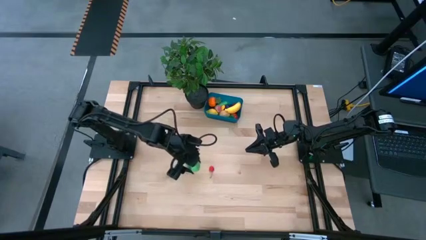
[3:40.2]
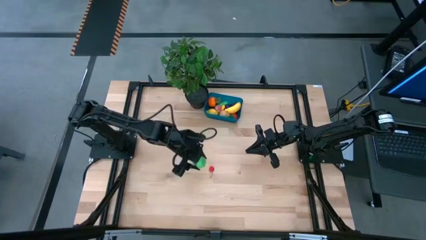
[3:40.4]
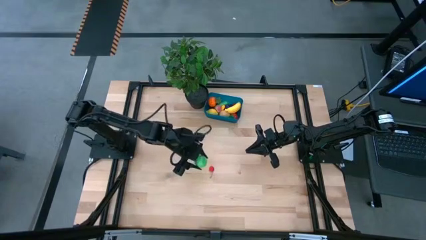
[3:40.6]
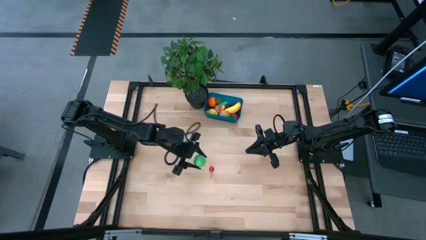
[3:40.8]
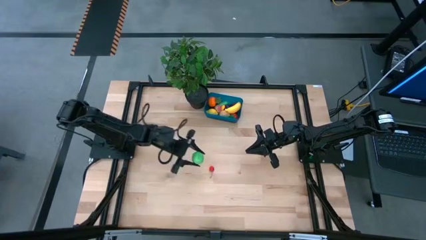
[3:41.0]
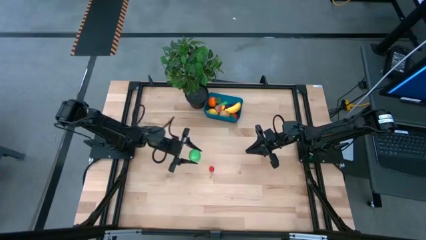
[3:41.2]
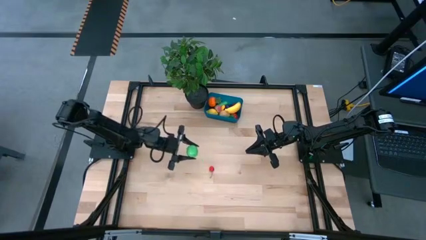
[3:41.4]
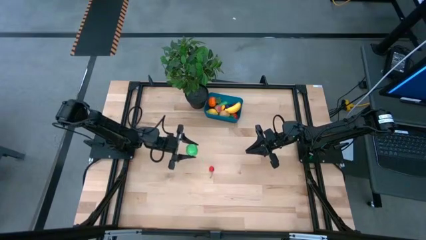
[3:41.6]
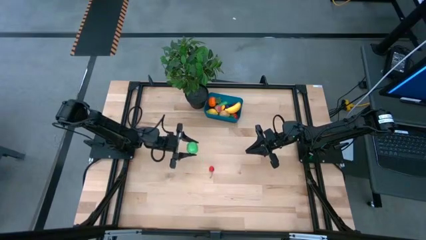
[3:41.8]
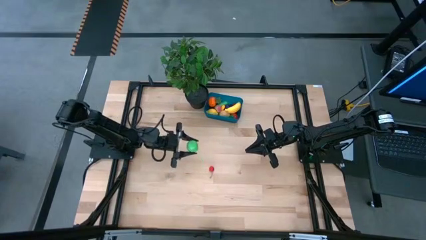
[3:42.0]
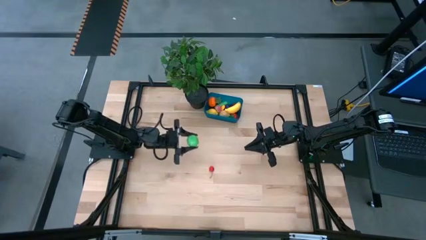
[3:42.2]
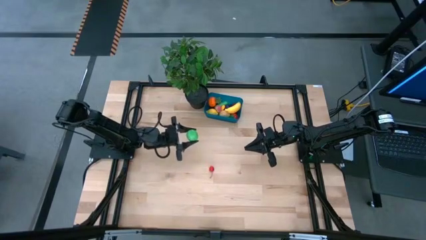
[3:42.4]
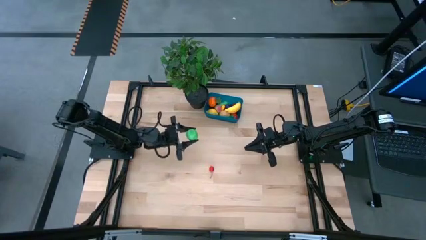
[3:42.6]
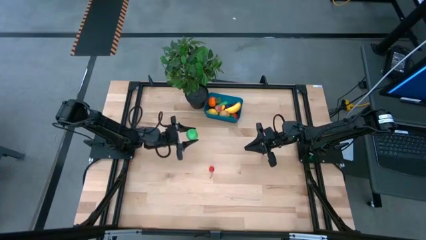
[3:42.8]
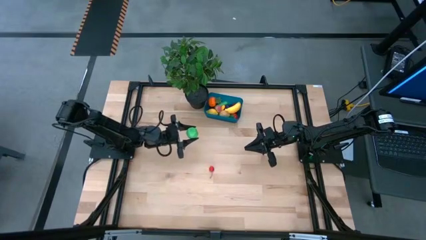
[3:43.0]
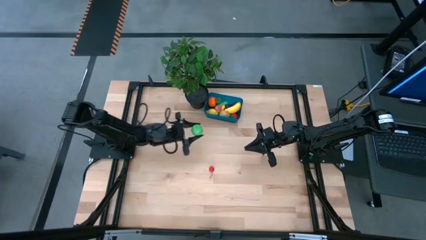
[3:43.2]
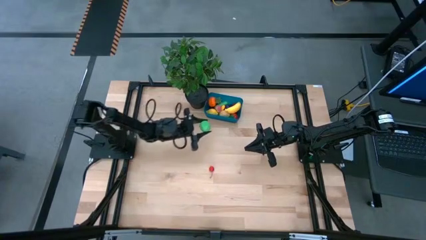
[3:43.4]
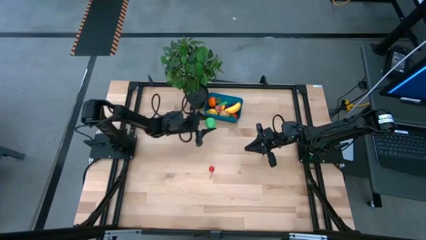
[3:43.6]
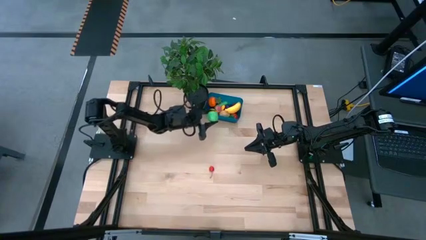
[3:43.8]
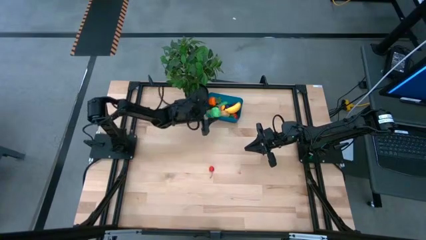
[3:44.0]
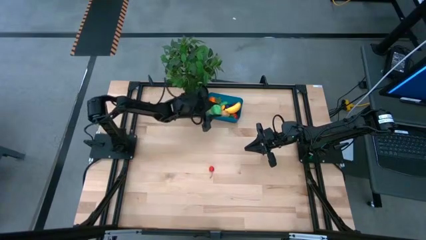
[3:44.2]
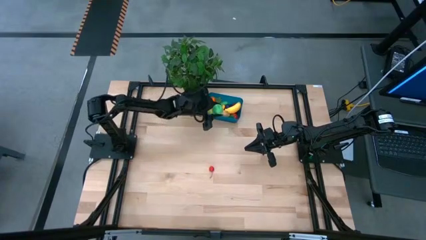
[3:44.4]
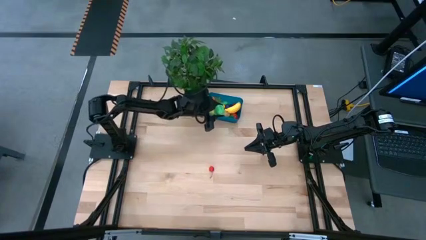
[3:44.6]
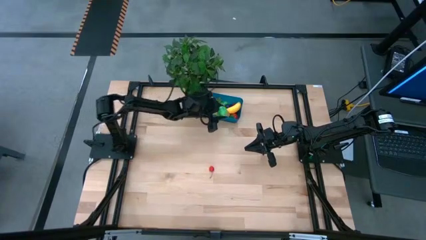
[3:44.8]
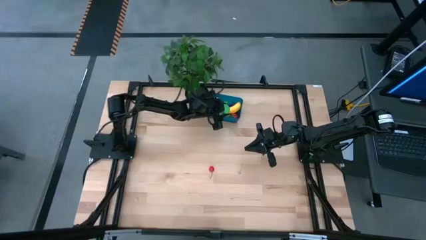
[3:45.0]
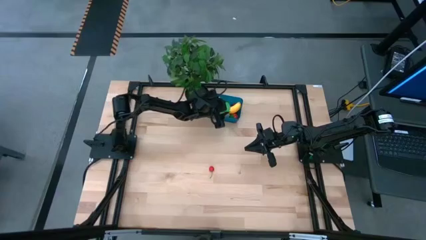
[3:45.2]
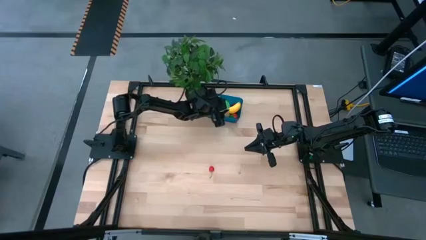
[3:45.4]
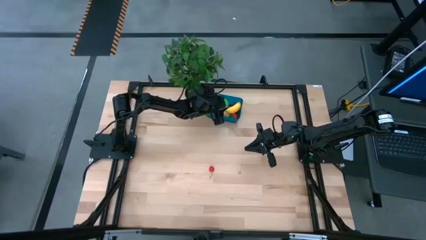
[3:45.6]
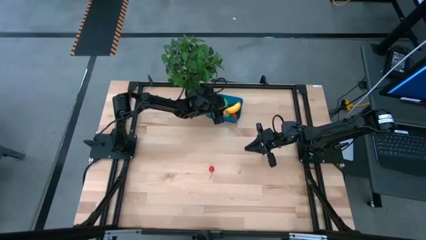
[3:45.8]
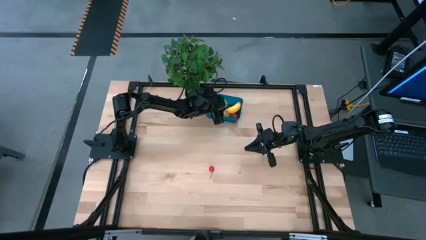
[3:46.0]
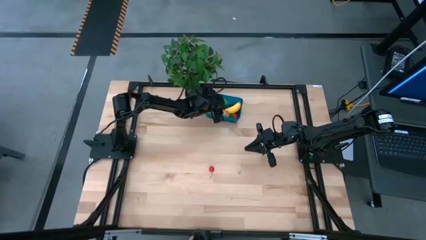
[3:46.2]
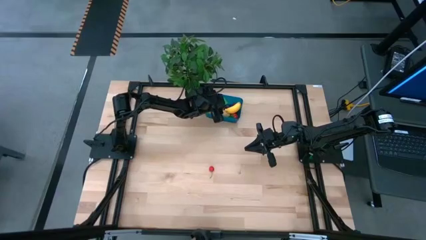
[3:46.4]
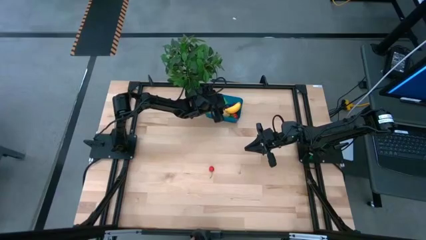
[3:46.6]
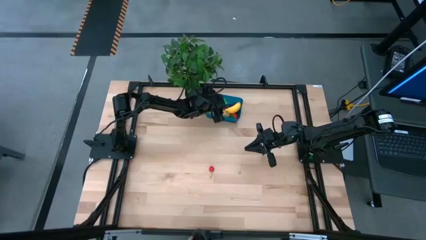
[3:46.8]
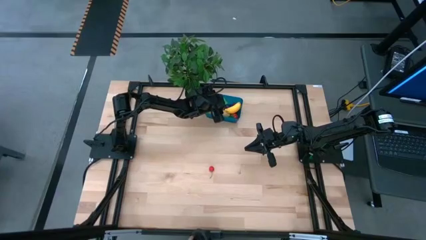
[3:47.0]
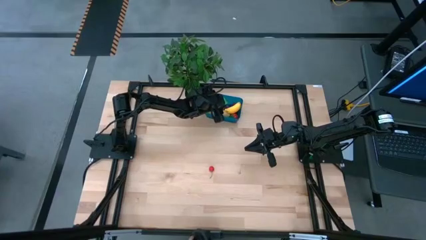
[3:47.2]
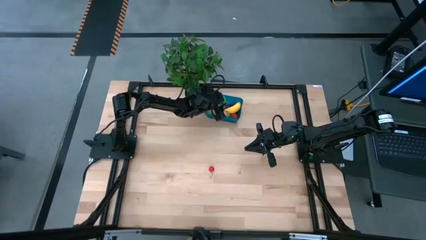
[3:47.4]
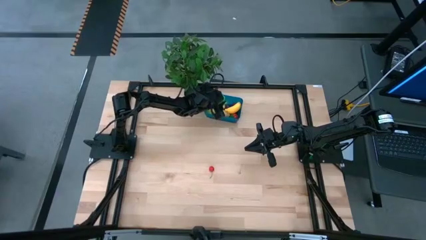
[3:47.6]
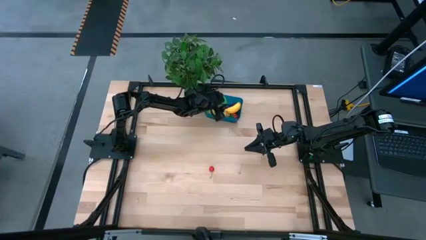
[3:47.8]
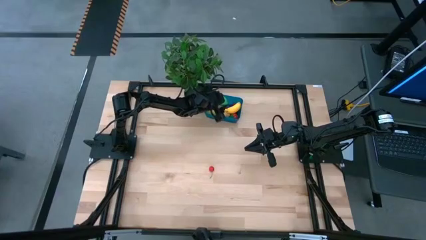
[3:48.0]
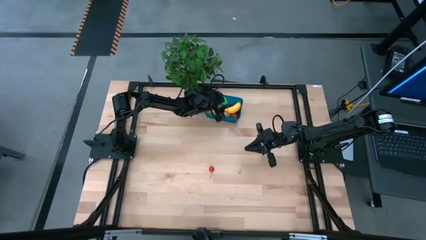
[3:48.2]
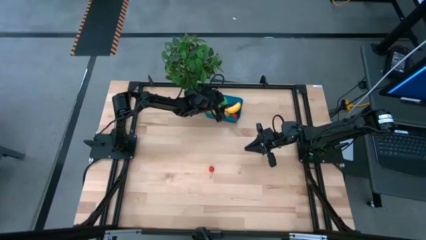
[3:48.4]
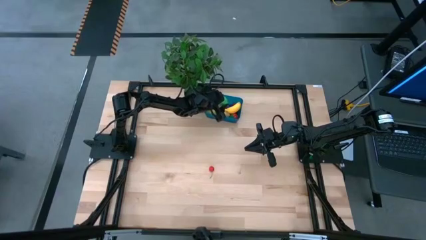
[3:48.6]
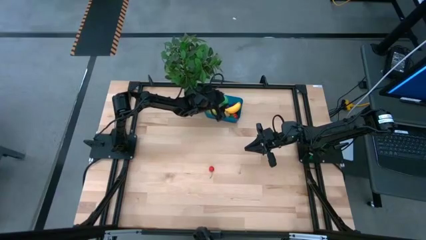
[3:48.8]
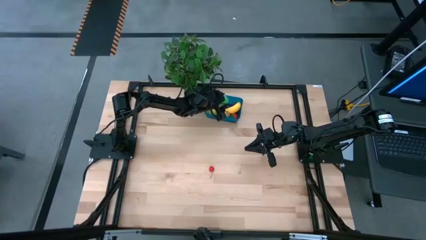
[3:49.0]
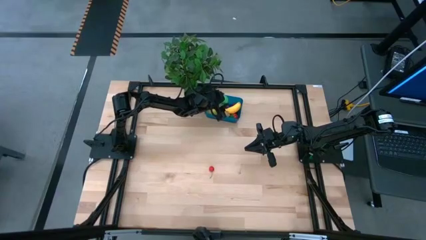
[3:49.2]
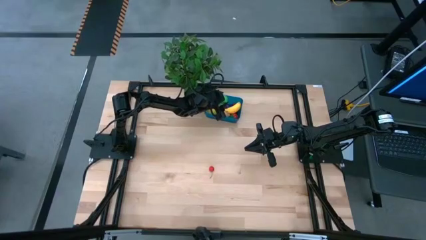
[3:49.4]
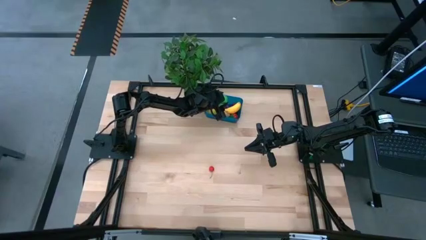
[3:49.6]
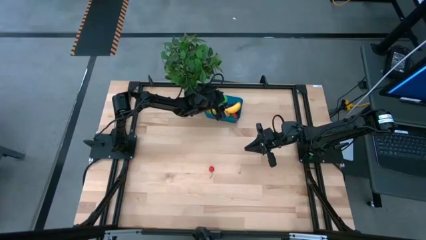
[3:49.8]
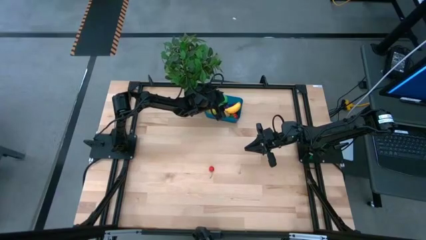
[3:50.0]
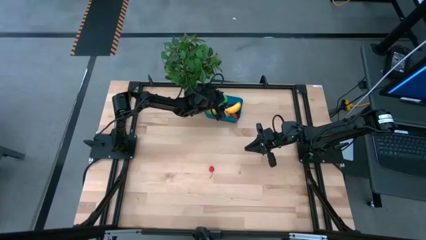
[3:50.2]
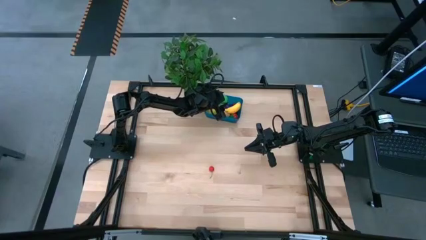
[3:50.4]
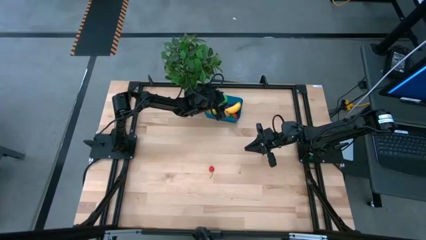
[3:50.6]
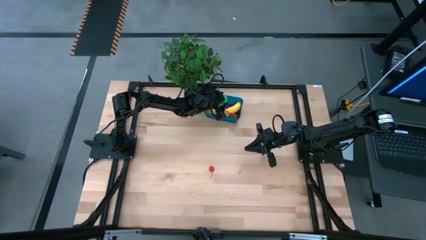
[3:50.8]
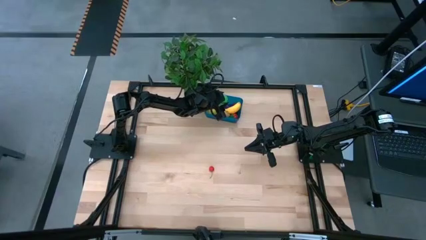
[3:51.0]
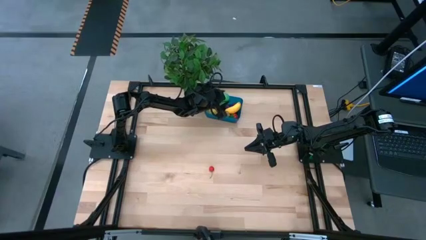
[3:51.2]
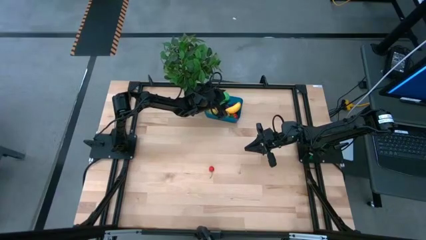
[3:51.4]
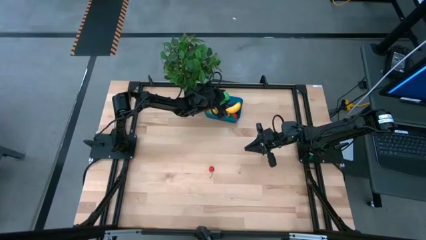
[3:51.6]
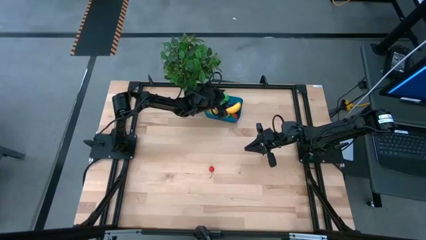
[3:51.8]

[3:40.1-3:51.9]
Task: Pick and placing Produce into tupperware
Put the green avocado into the blue container
